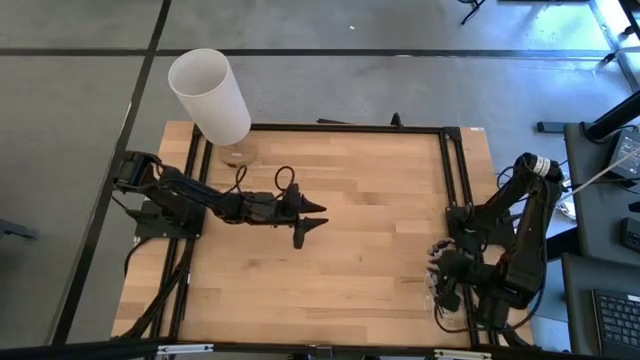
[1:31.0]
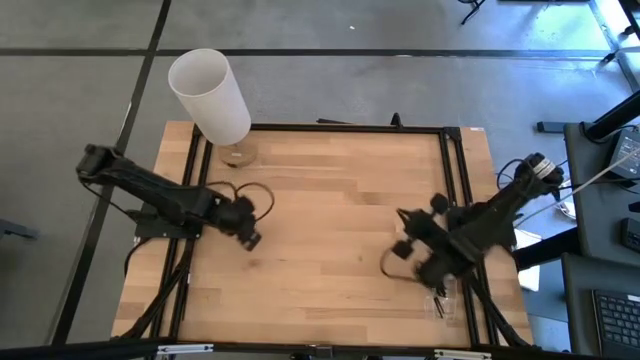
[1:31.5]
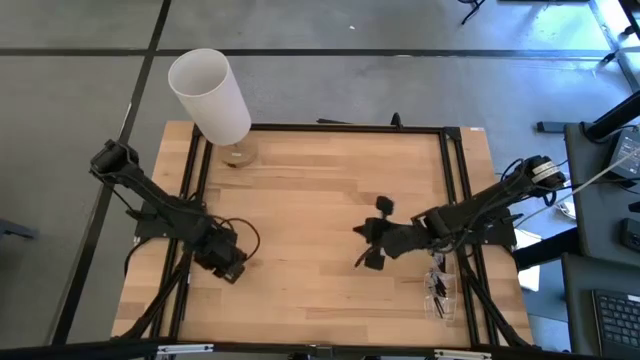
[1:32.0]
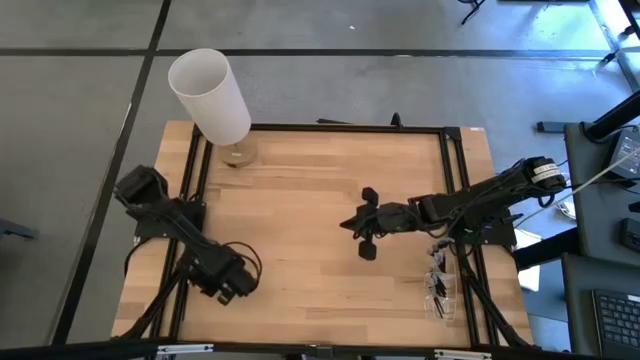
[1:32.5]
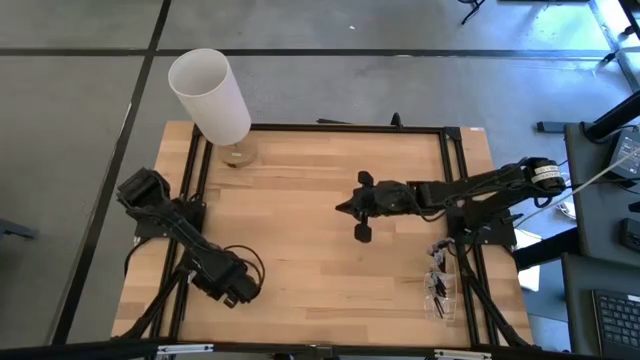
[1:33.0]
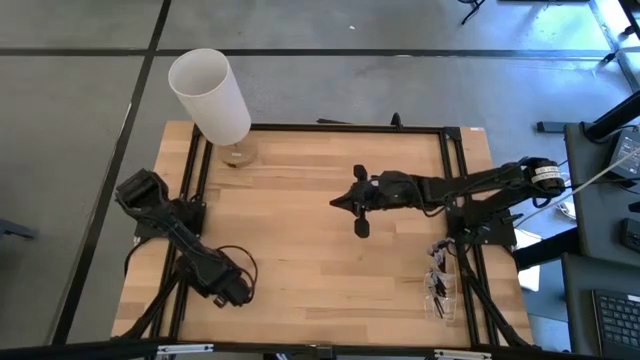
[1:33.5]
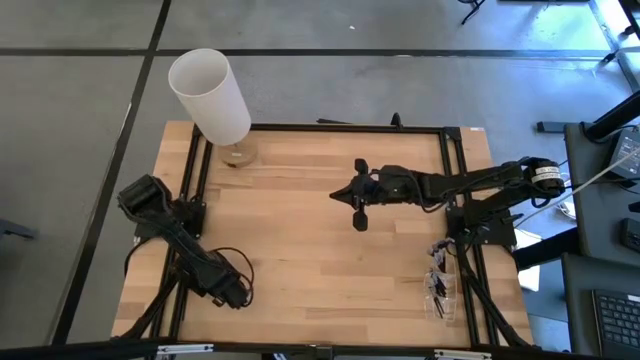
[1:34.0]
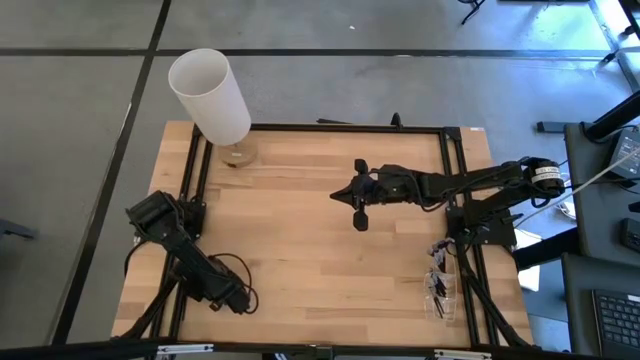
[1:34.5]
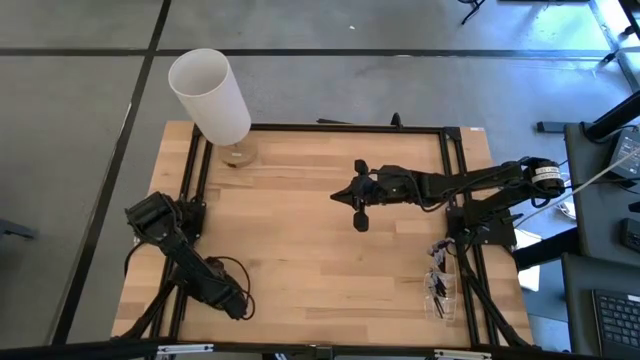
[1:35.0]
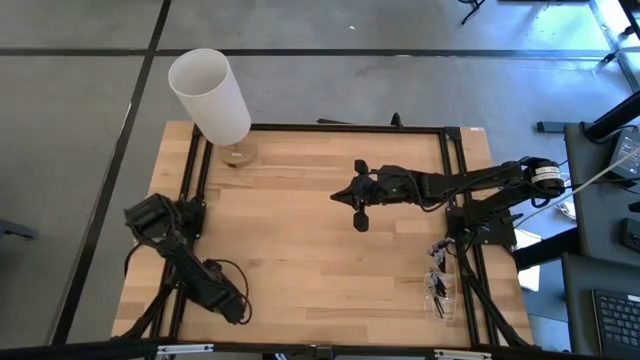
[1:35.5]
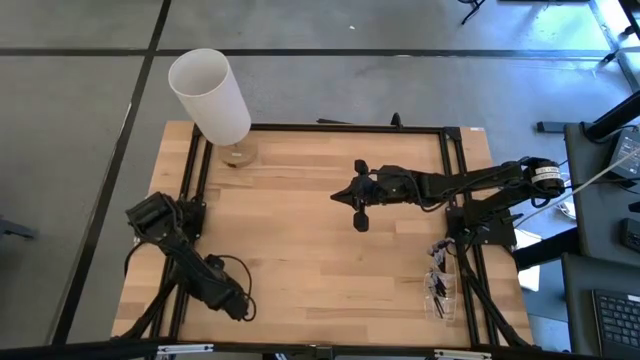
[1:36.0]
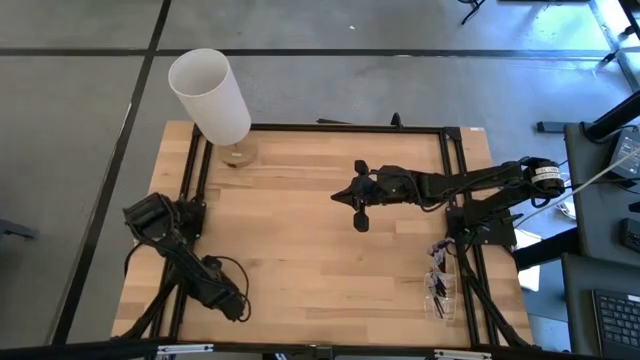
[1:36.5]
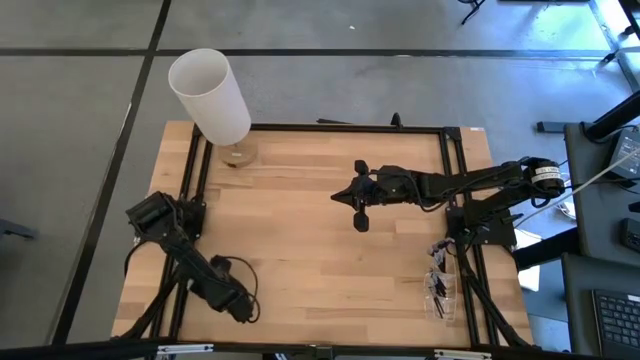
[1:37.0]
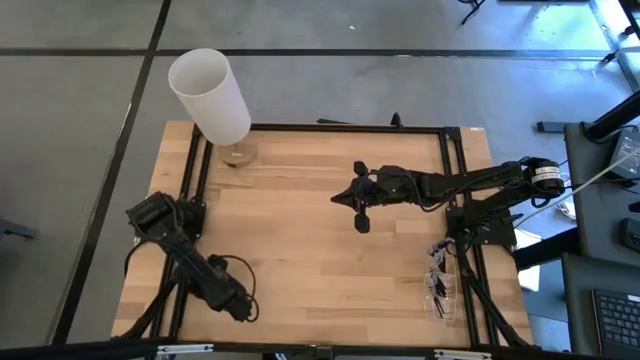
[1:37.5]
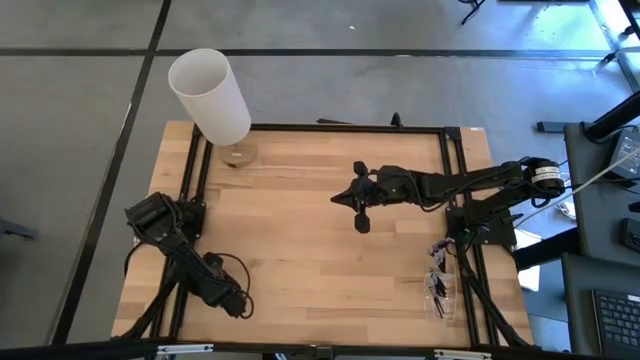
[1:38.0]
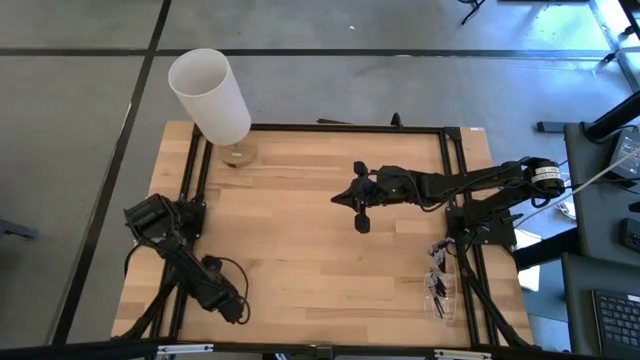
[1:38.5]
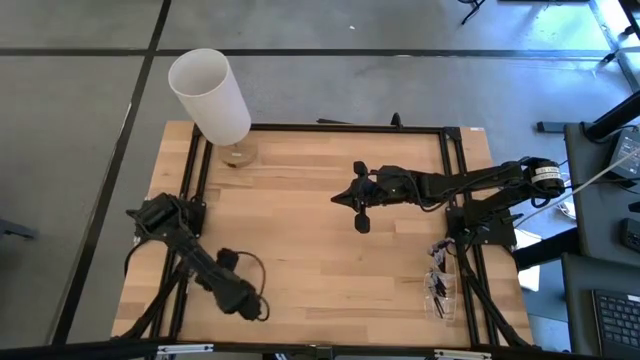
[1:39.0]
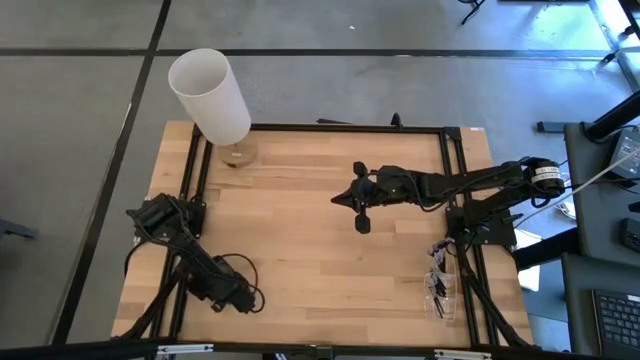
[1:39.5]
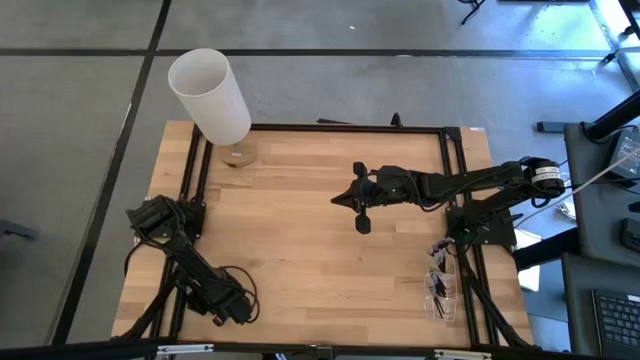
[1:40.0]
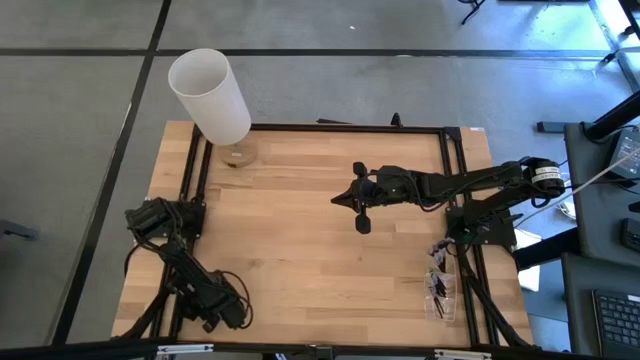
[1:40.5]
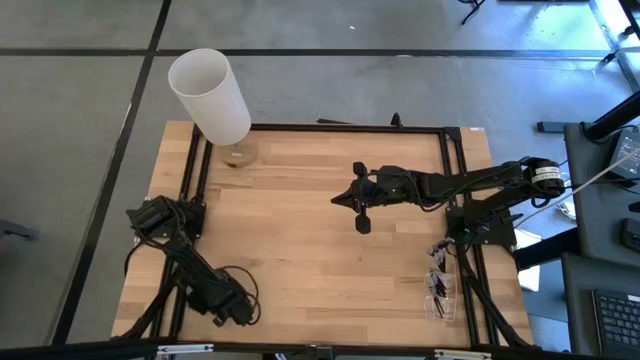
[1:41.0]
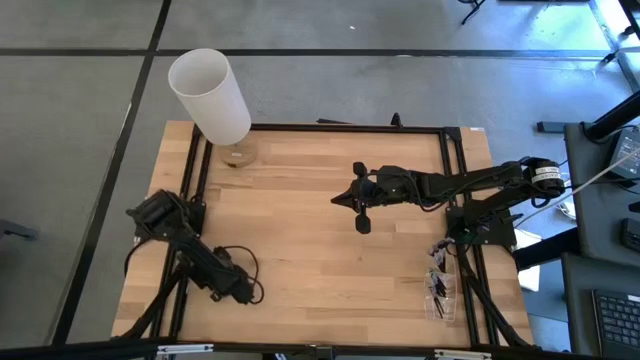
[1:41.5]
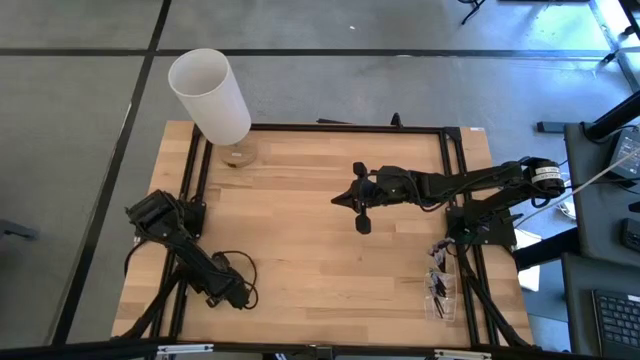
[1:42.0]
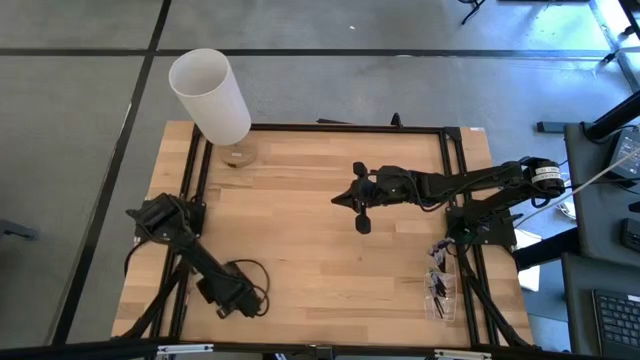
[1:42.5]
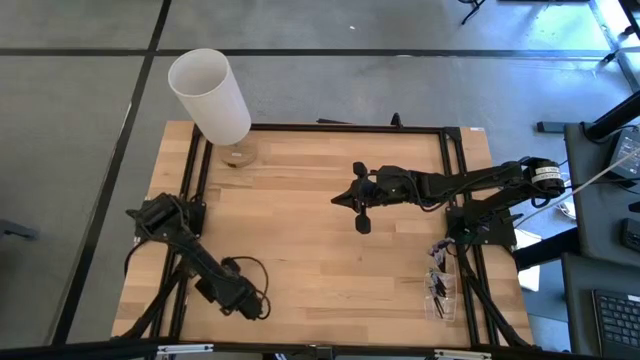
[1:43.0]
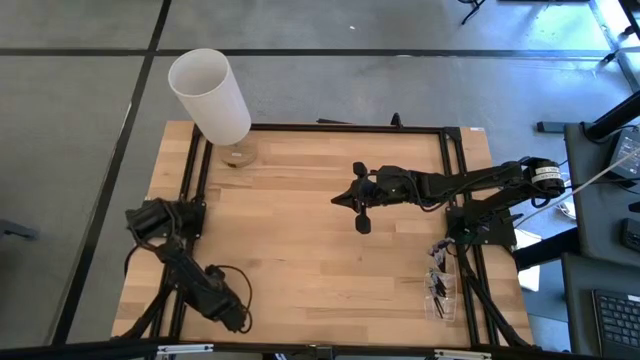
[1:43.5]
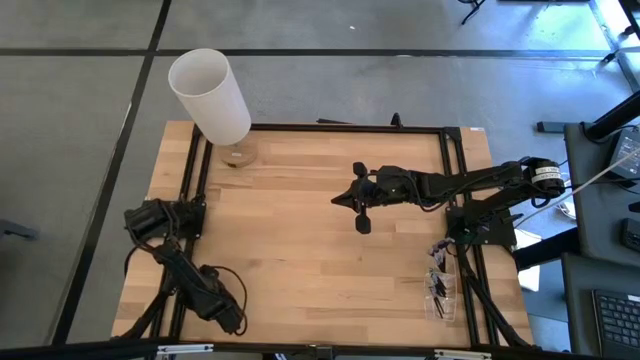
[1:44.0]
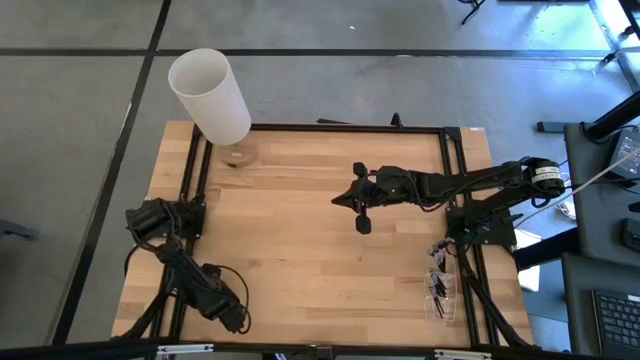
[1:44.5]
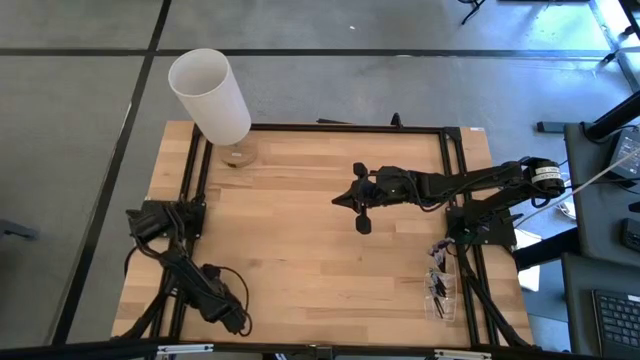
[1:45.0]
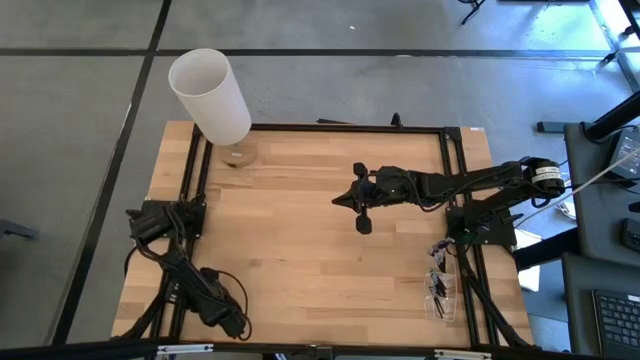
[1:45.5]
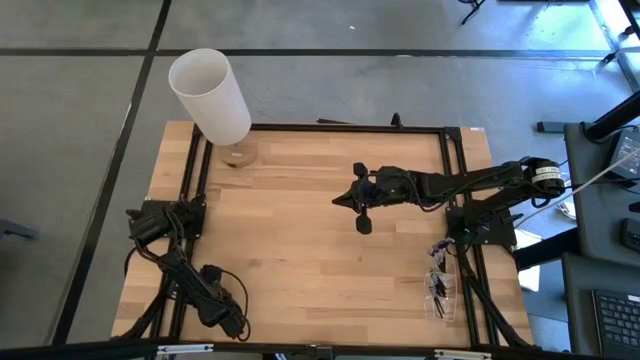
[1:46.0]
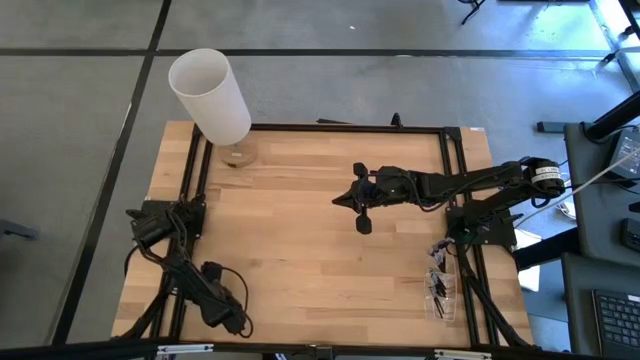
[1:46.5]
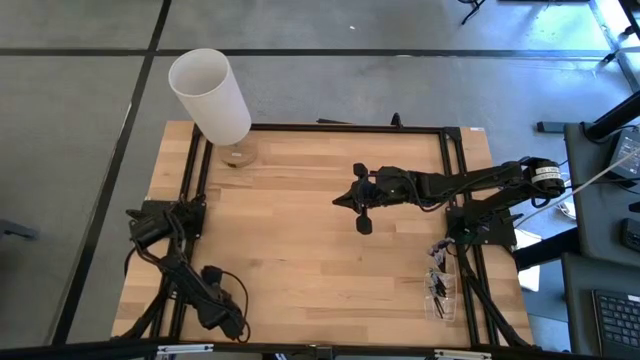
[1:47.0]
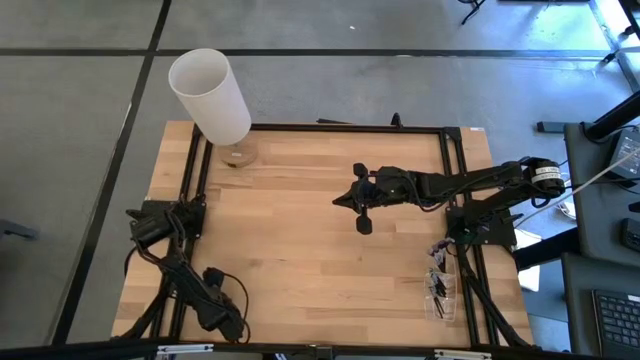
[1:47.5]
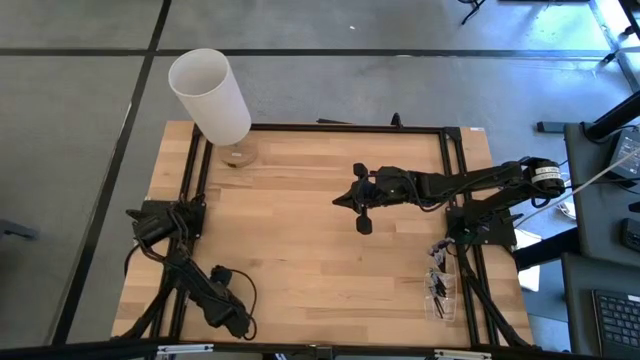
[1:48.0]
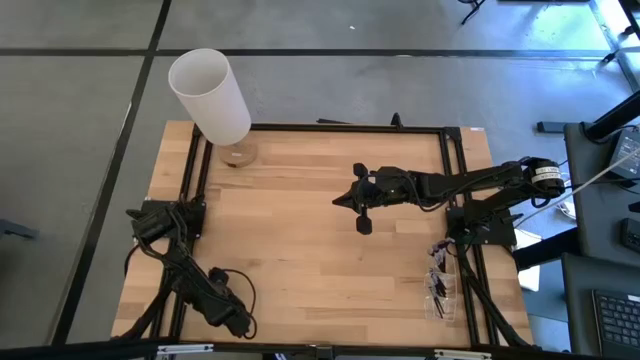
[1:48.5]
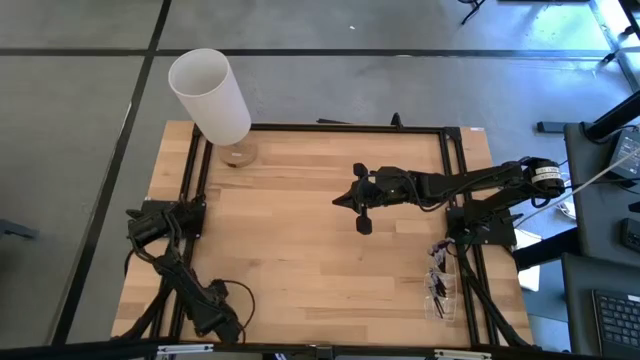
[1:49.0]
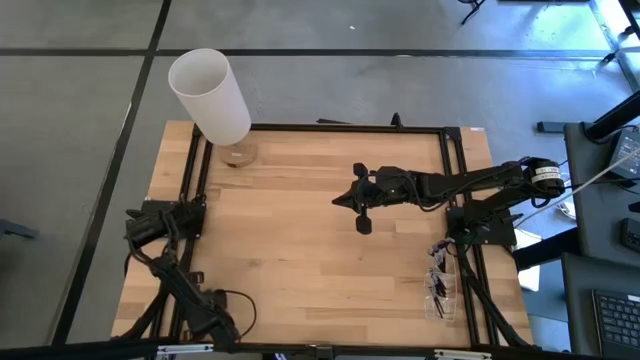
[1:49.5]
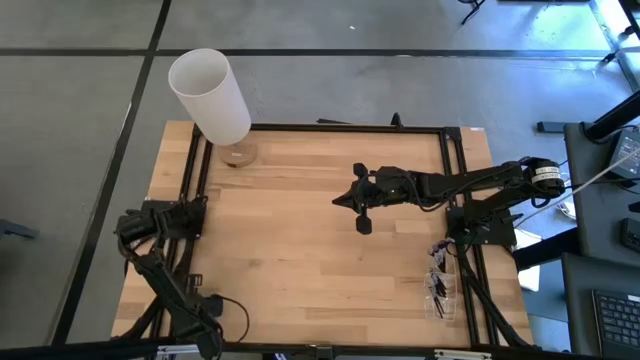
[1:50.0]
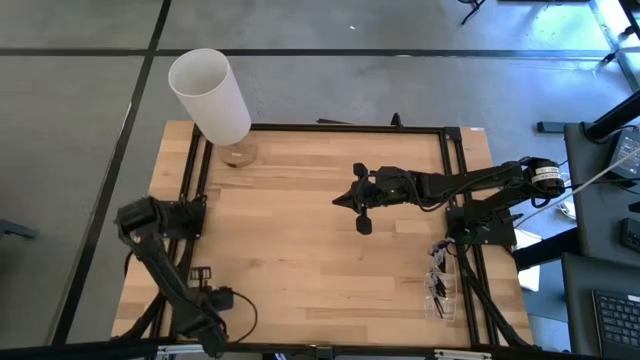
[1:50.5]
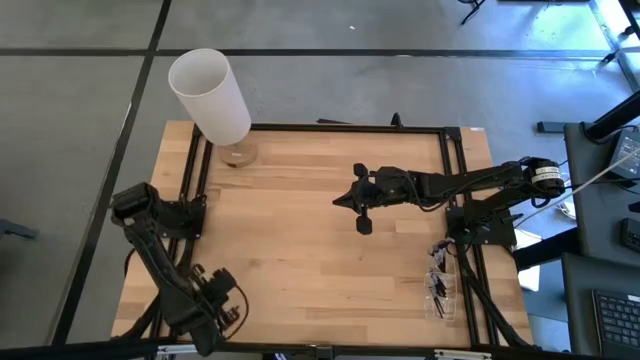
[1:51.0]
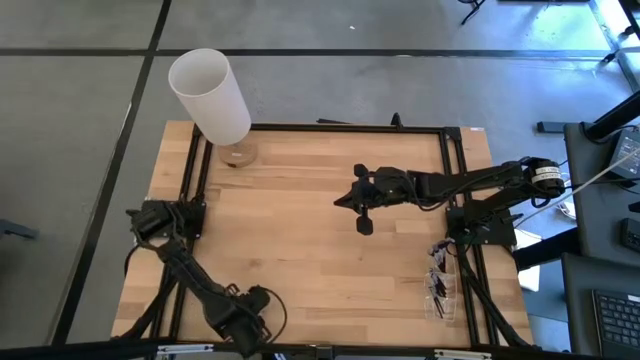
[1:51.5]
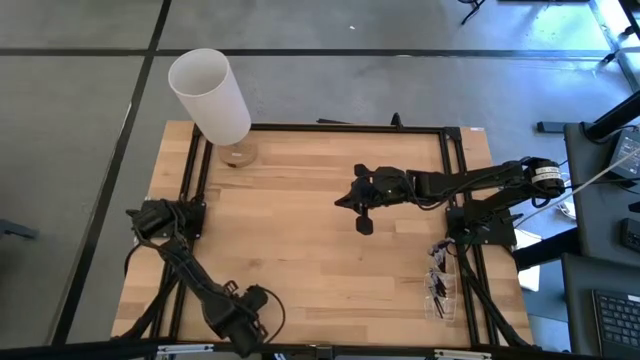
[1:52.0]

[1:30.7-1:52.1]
Task: Put items in baskets/containers
Put the eyeshadow brush into the transparent organizer
